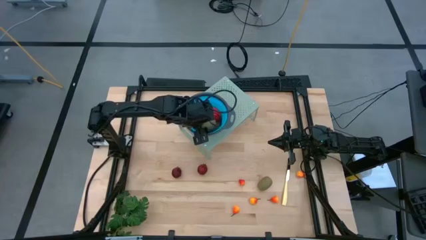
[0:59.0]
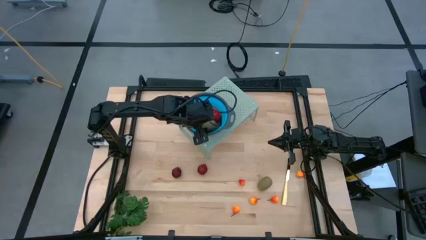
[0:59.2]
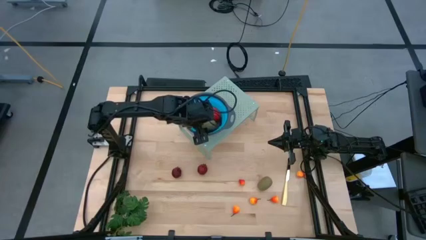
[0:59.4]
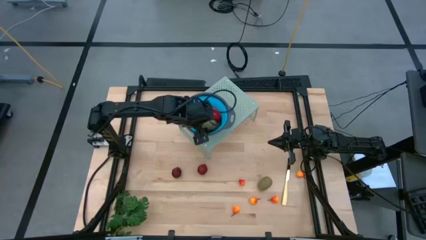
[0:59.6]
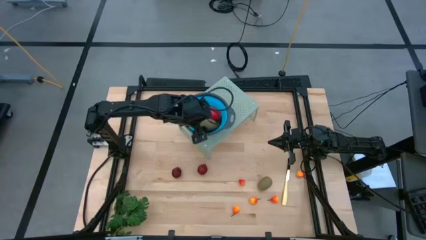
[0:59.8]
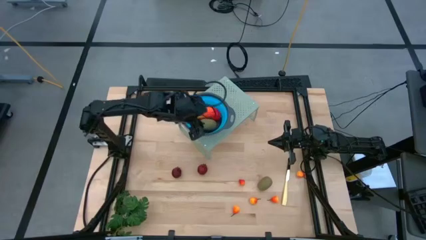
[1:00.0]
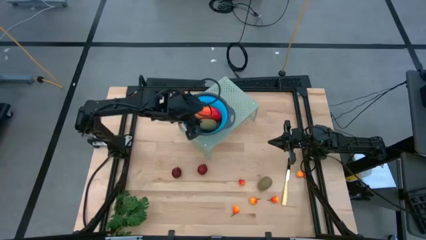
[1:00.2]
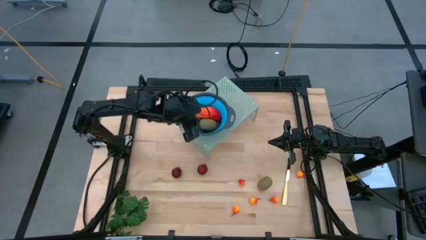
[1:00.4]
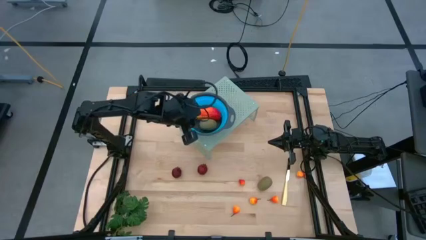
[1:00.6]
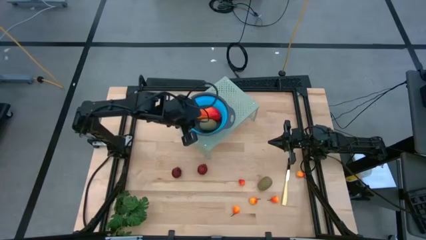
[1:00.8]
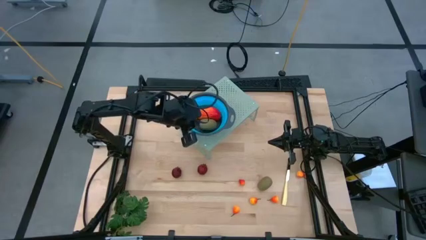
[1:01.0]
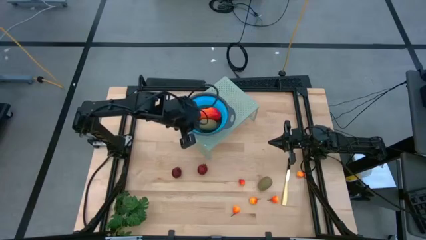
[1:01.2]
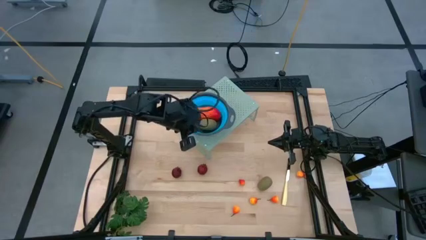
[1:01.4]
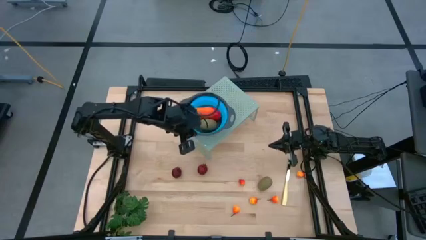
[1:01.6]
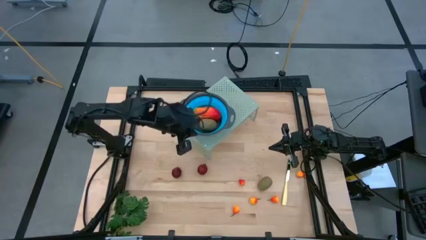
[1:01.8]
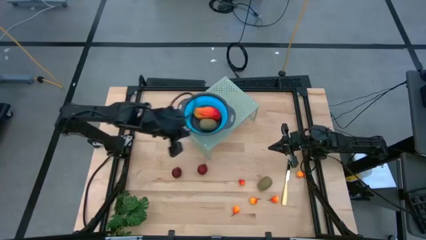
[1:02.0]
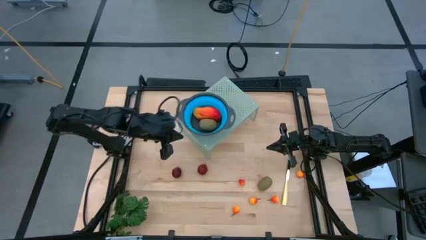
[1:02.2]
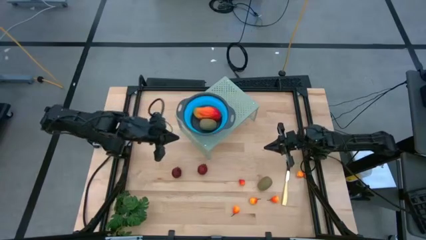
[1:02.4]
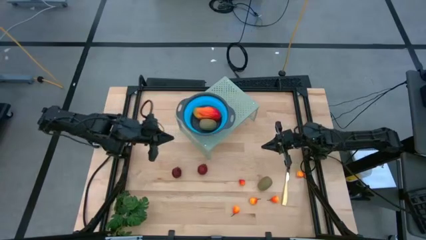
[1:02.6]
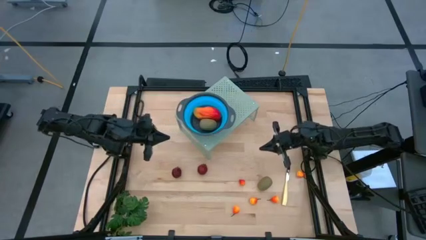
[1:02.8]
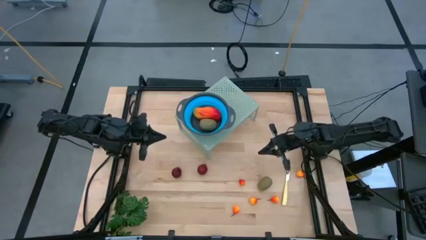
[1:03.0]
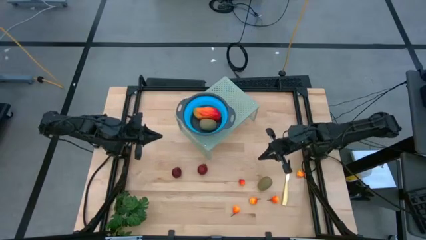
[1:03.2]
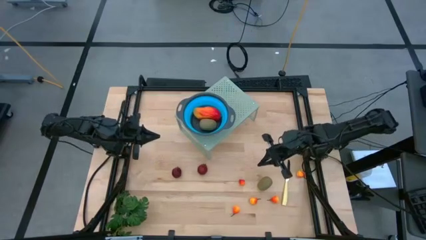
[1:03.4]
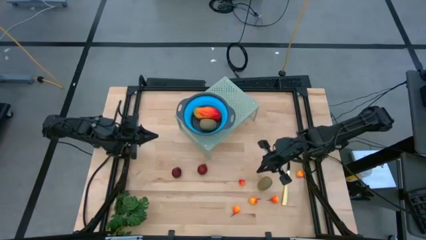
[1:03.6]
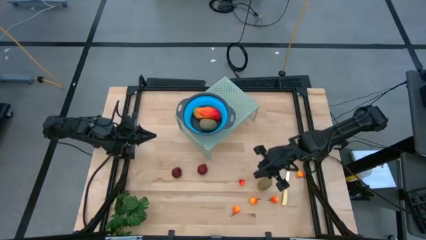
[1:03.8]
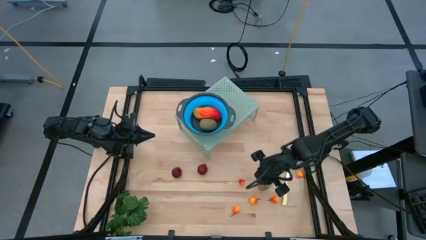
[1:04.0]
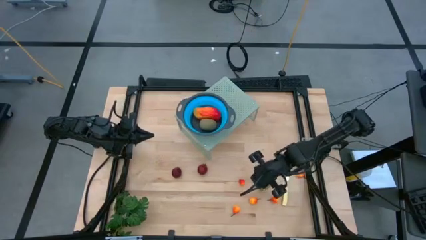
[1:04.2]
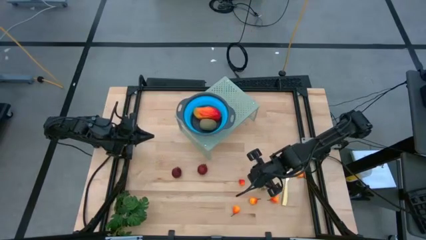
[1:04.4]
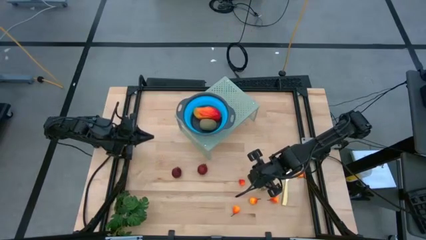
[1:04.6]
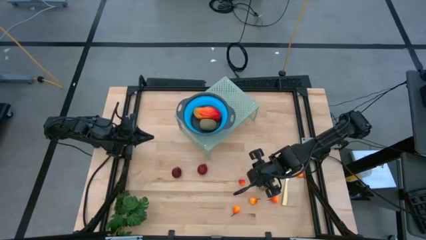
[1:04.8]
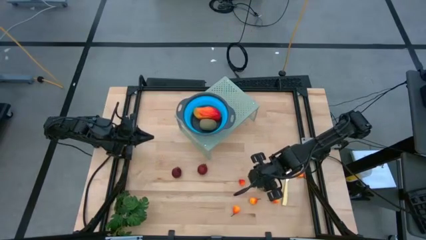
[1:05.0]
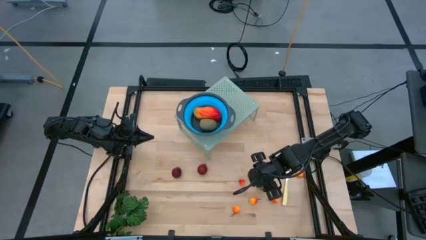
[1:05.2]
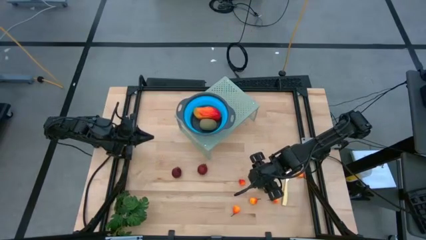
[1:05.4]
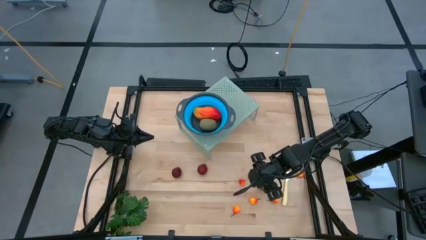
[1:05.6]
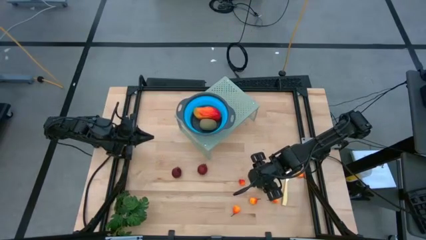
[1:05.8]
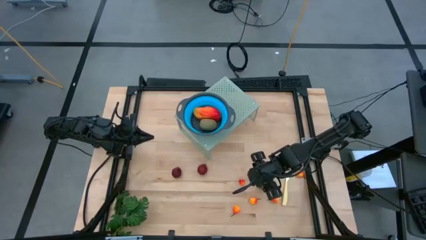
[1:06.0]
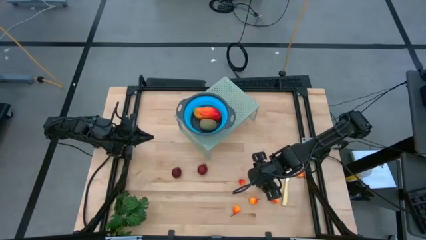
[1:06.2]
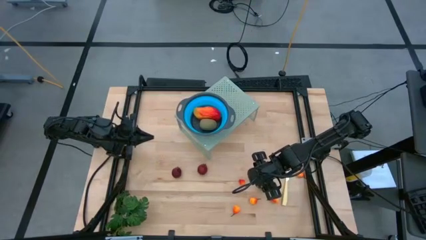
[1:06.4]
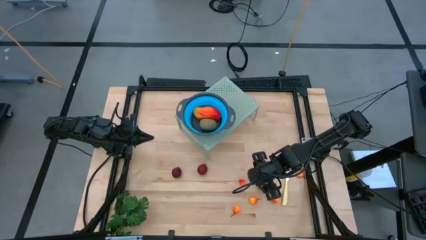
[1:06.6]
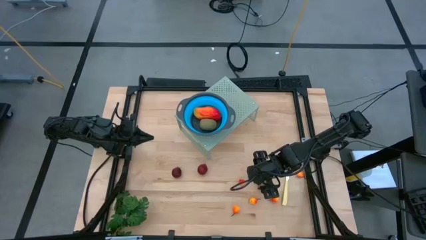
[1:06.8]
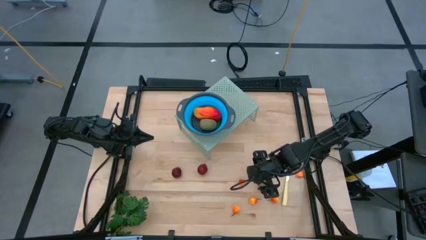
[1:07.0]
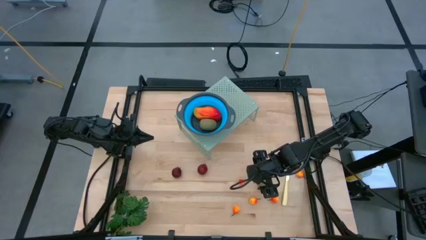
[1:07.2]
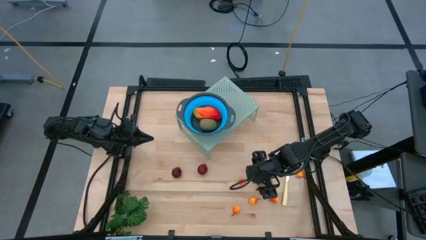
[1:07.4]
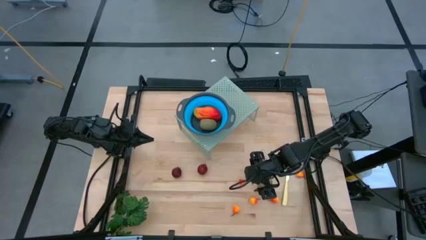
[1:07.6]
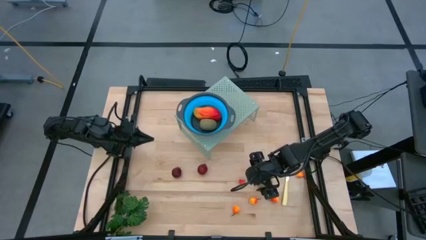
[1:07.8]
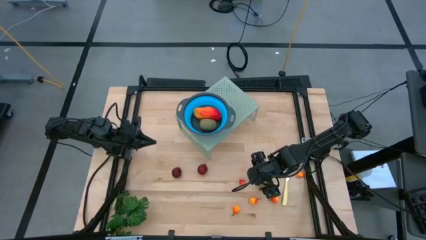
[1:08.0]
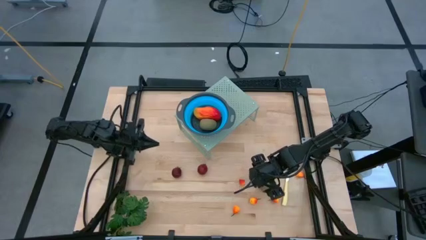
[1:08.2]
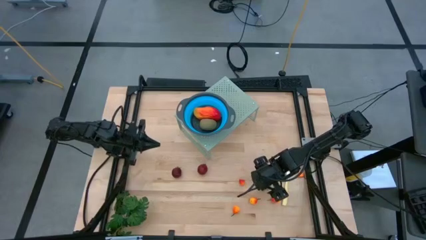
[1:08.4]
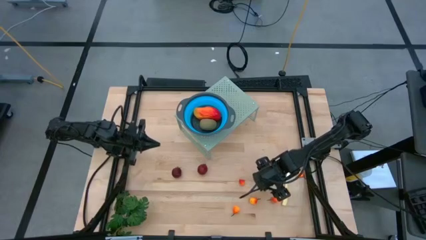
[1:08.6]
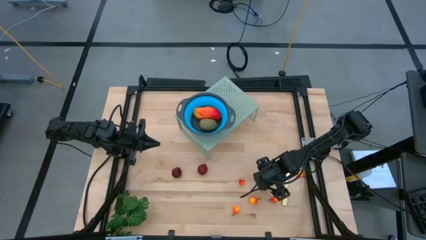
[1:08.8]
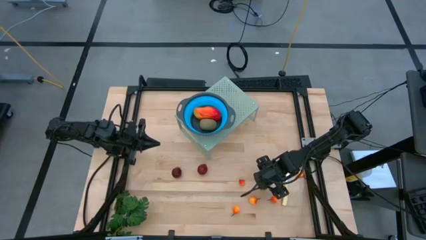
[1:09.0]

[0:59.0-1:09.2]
Task: Pick & Place Fruit
Put the kiwi into the collapsible colander on the shelf
